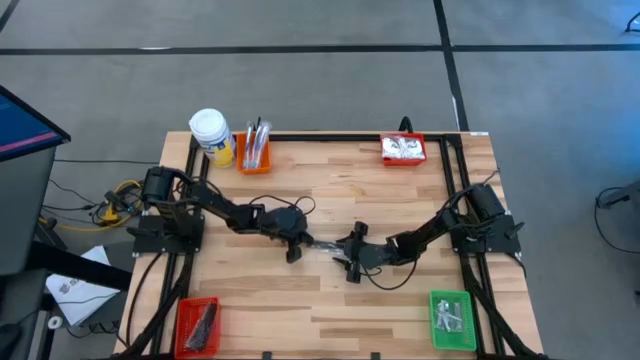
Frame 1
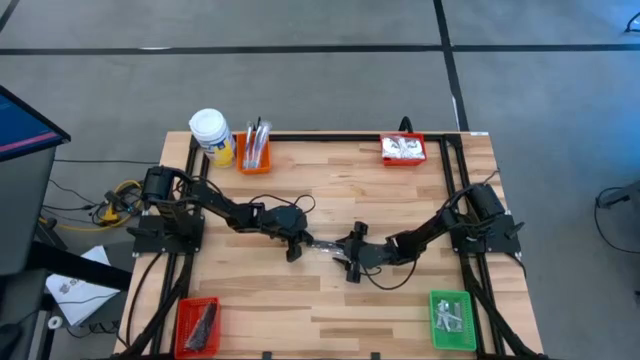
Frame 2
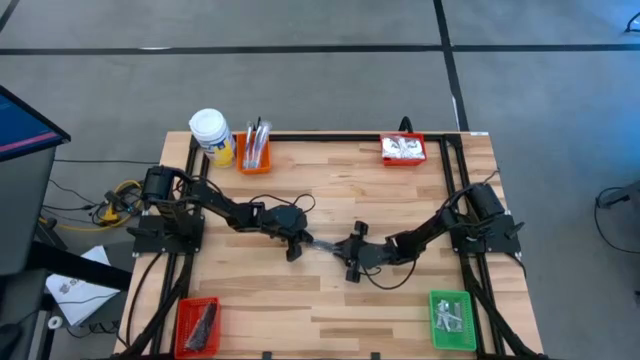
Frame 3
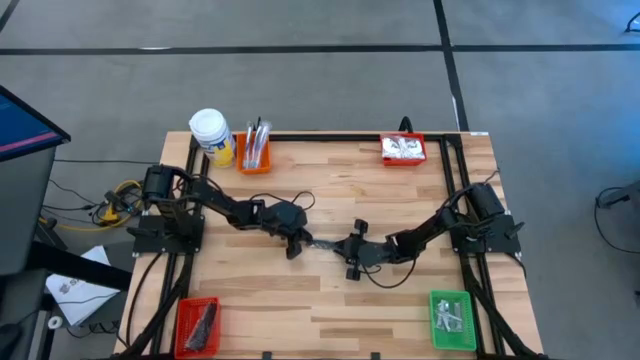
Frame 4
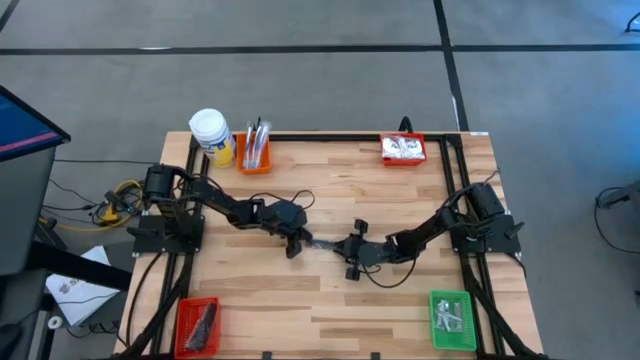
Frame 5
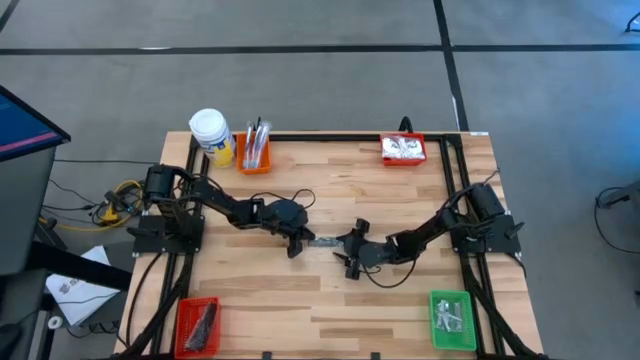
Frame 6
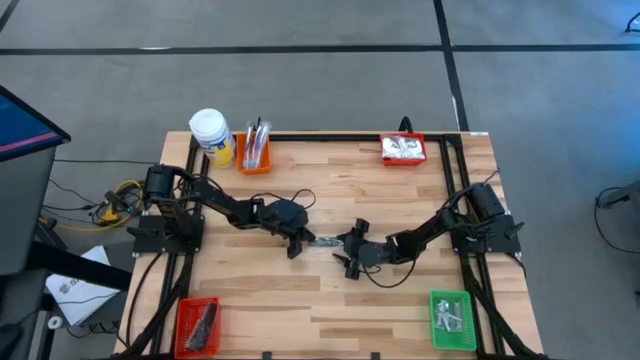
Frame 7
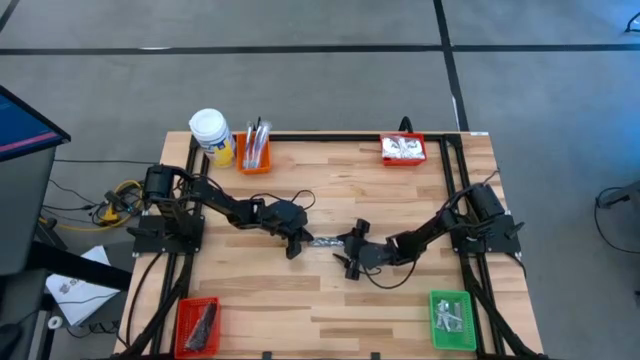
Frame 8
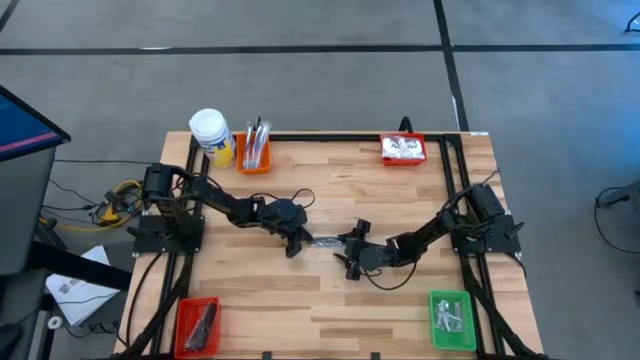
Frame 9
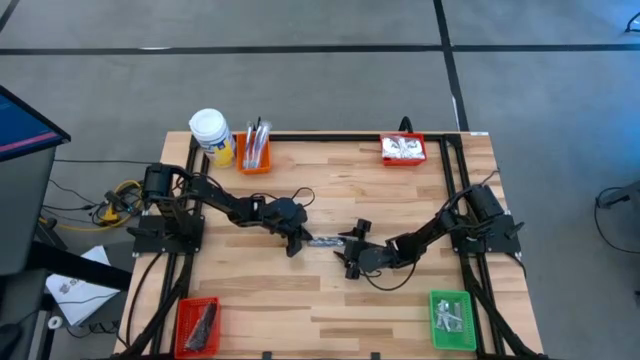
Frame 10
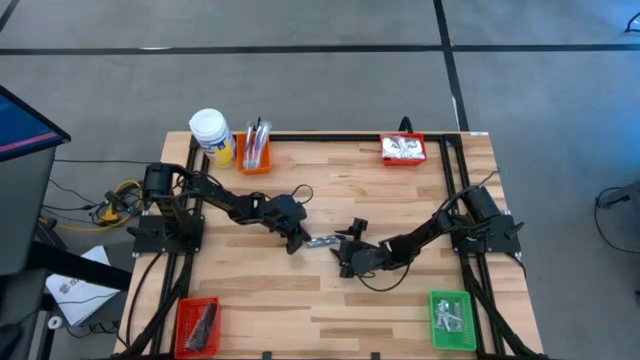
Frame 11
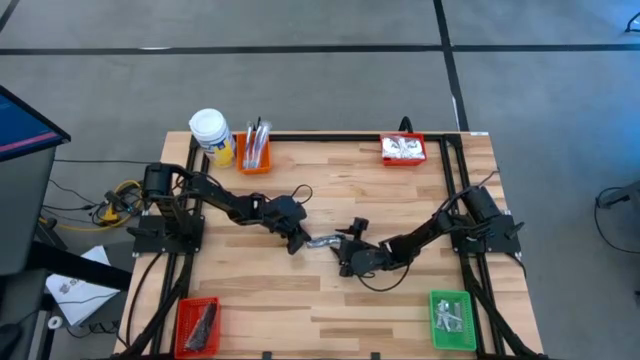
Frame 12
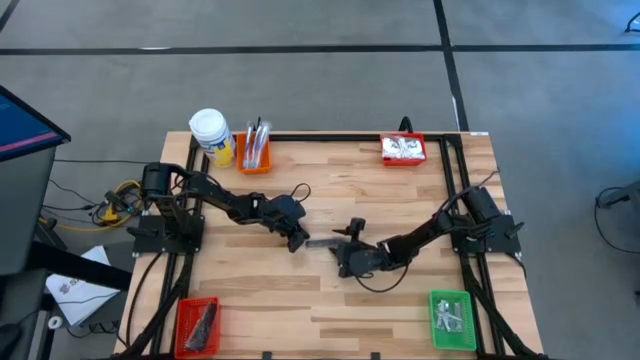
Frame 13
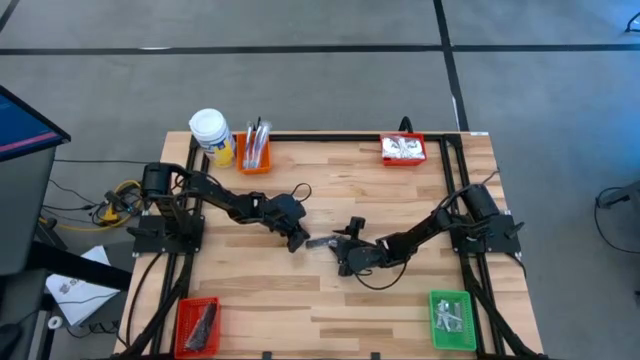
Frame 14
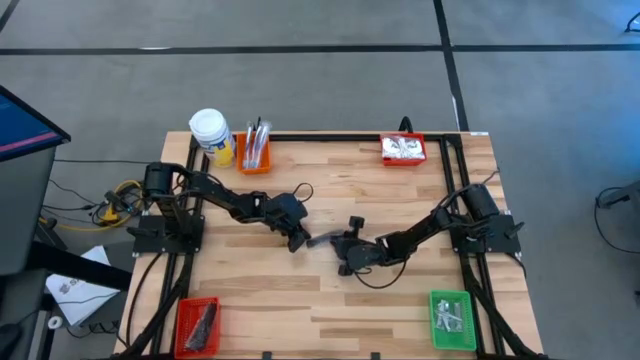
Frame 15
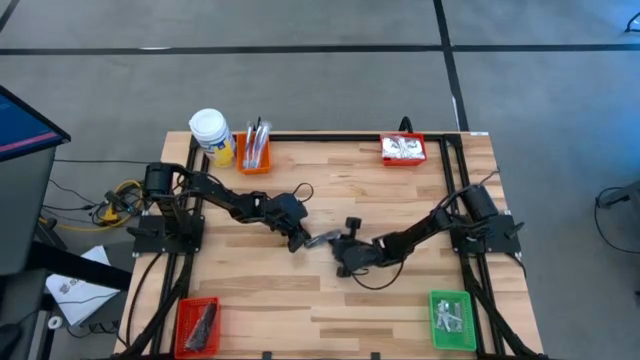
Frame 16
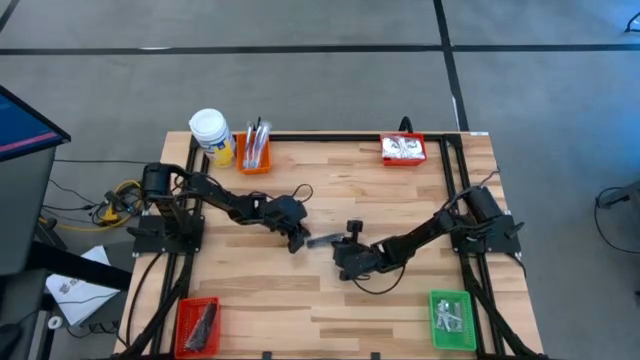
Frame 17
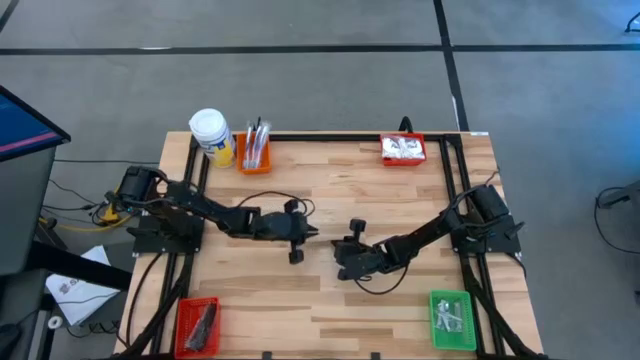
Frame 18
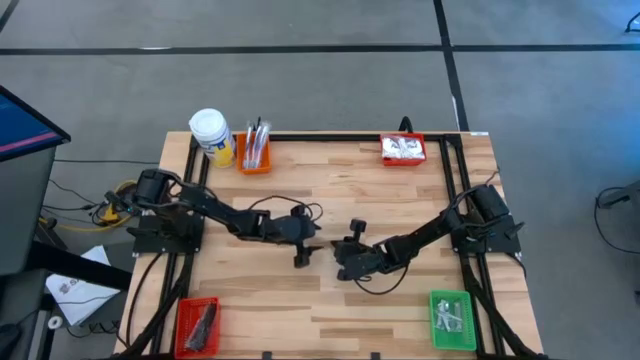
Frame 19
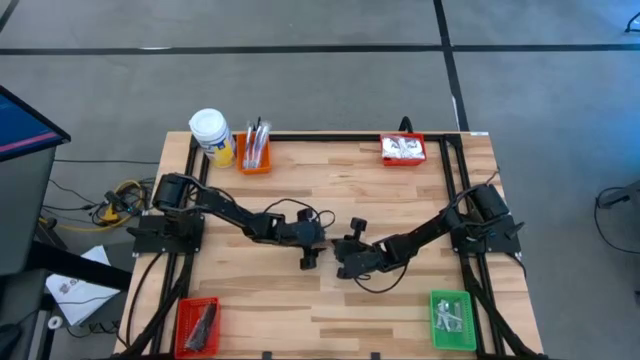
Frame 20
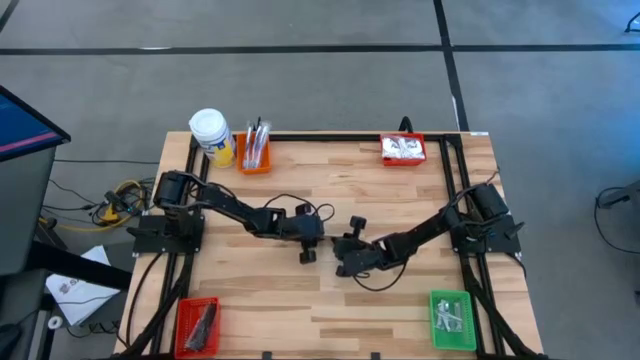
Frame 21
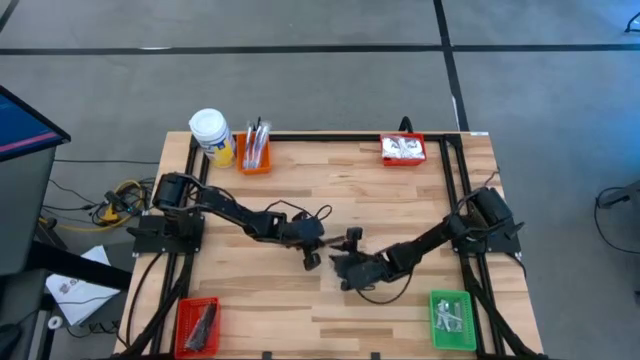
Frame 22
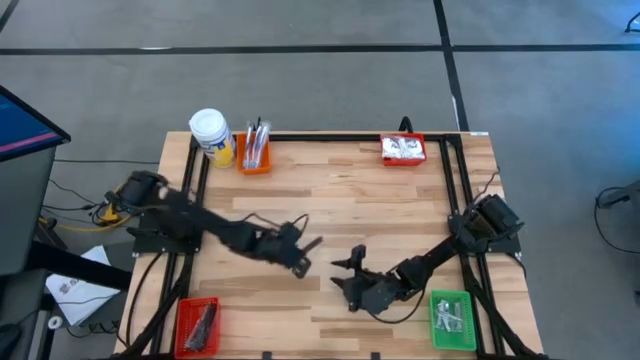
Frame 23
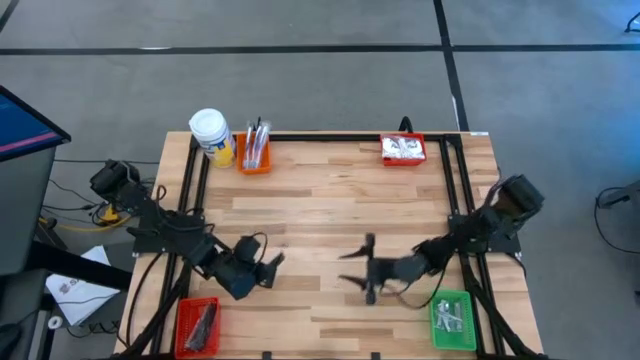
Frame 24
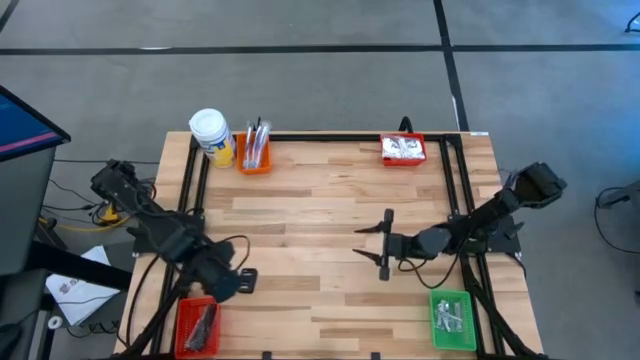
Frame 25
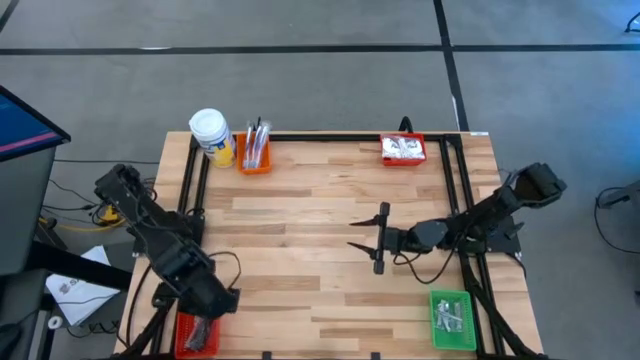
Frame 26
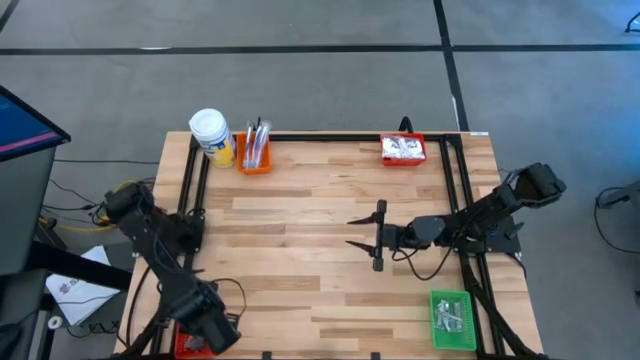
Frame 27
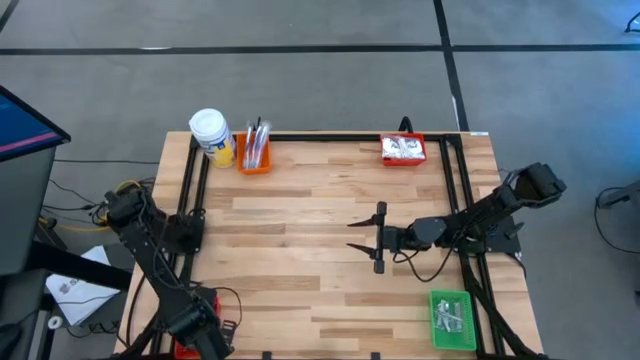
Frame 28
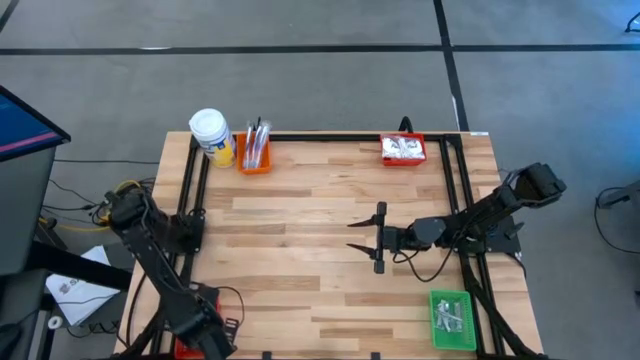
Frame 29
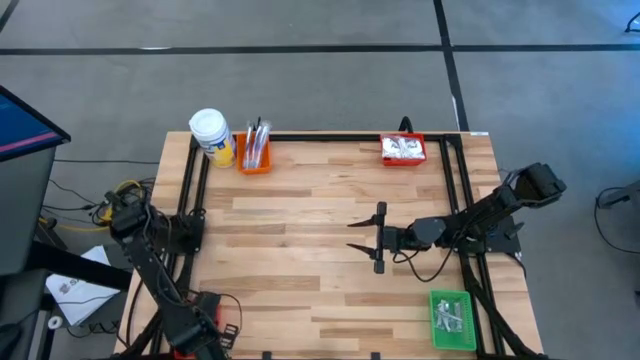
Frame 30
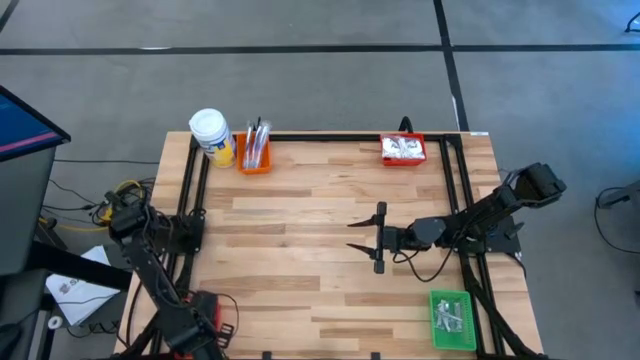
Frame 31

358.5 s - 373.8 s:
Task: Pick & Place Travel size toiletries
Put the comb into the bottom red bin

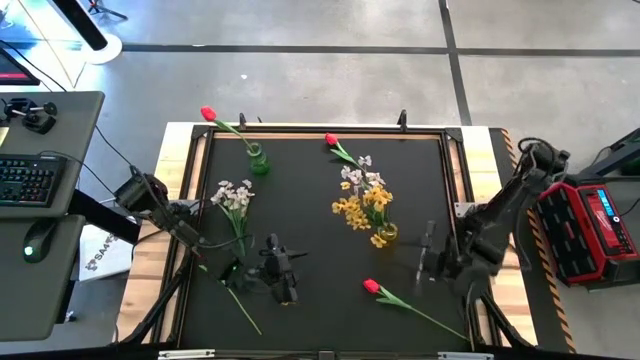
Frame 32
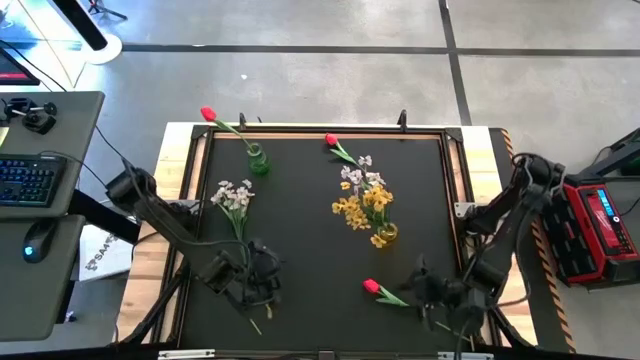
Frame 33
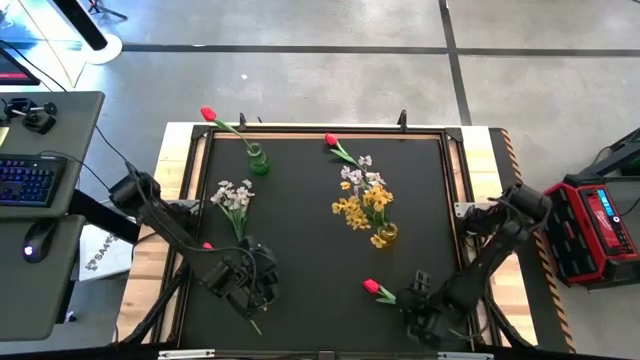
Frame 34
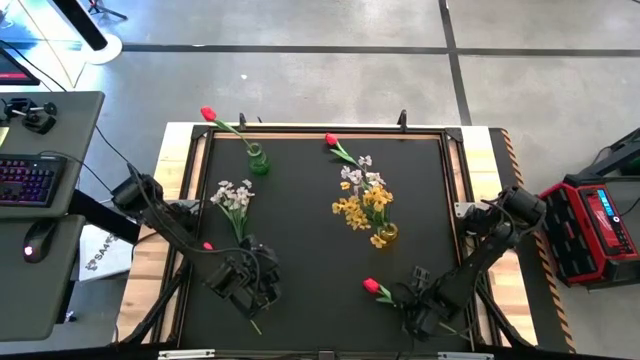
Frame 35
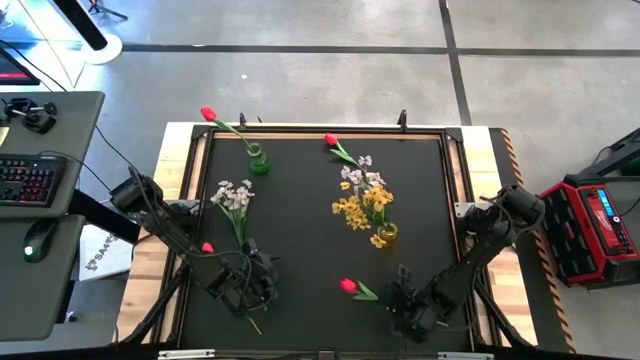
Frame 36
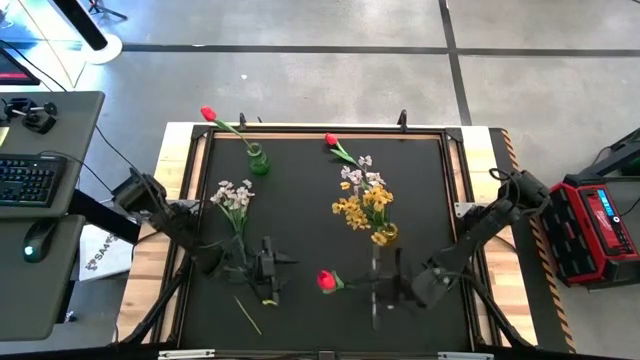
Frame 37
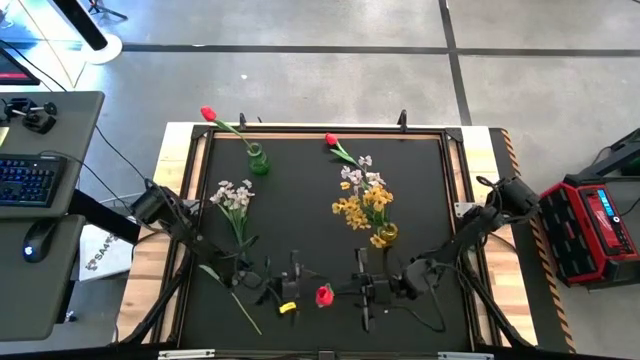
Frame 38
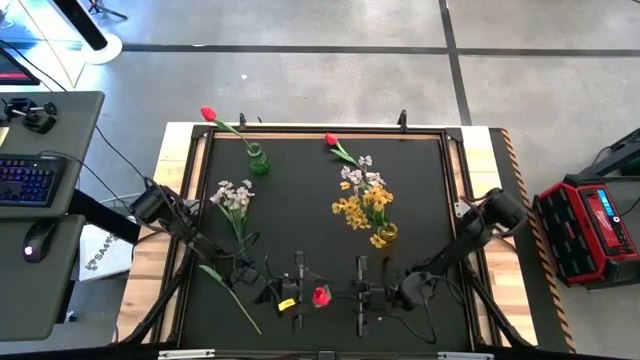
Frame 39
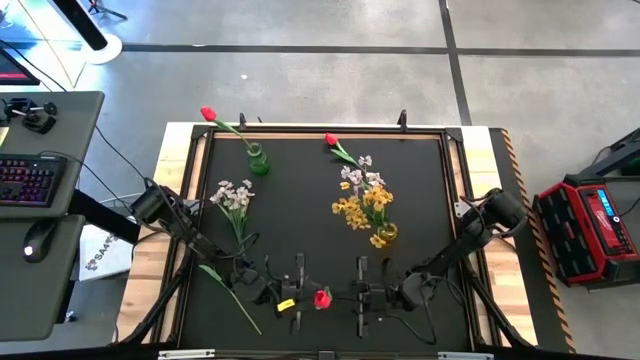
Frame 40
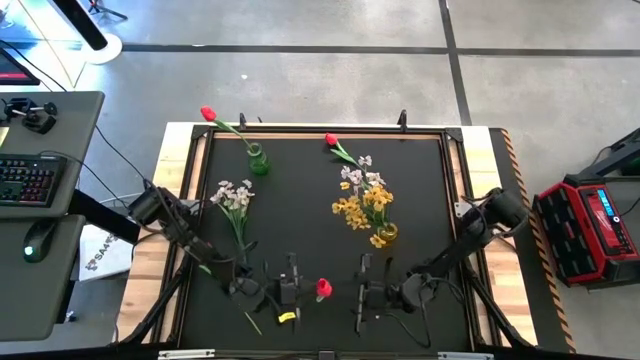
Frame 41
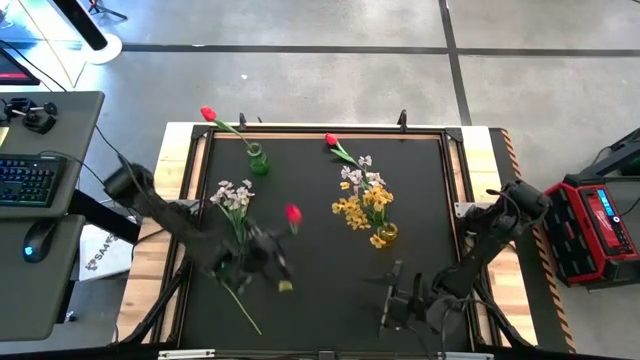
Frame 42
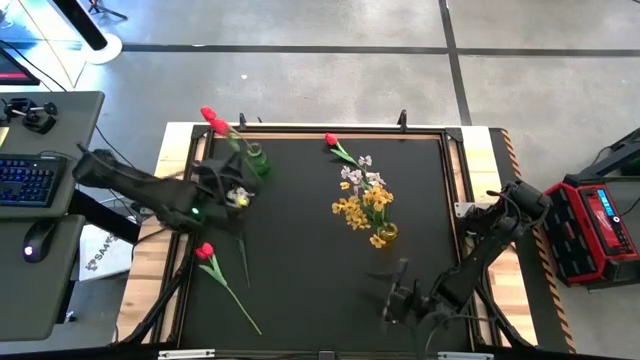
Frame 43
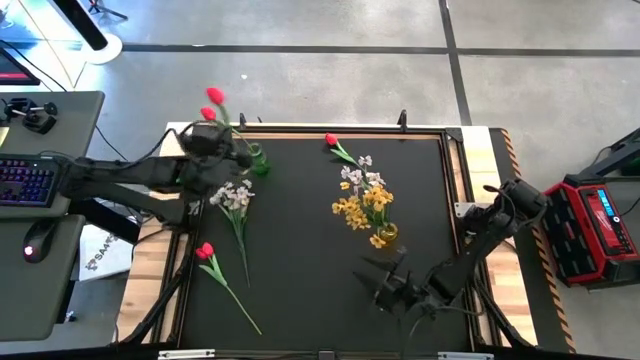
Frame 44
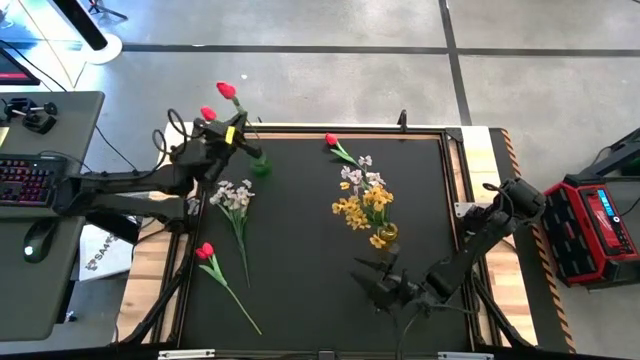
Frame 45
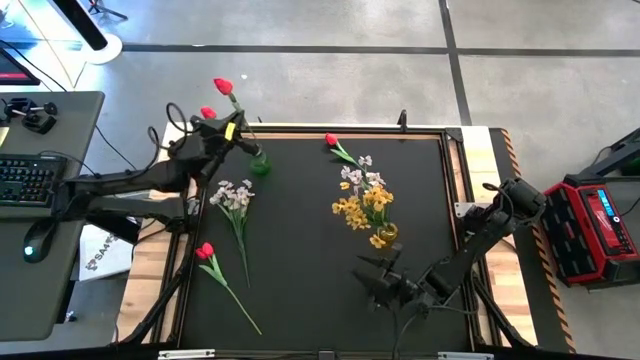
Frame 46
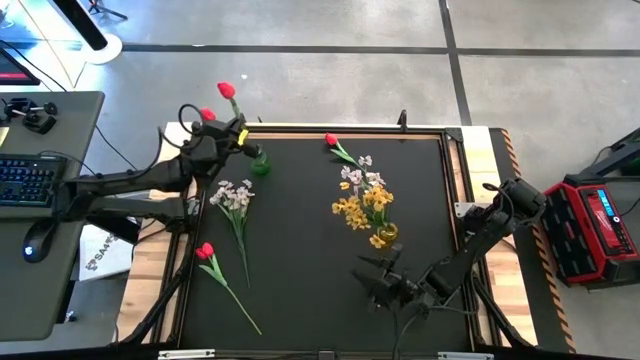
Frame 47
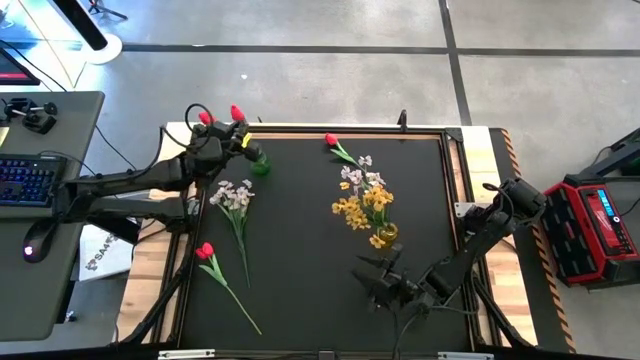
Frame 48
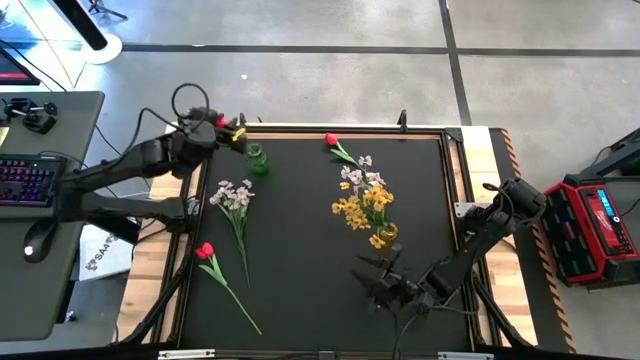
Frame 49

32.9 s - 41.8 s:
Task: Sort flowers into vase by color
Put the bottom right red tulip in the green vase
